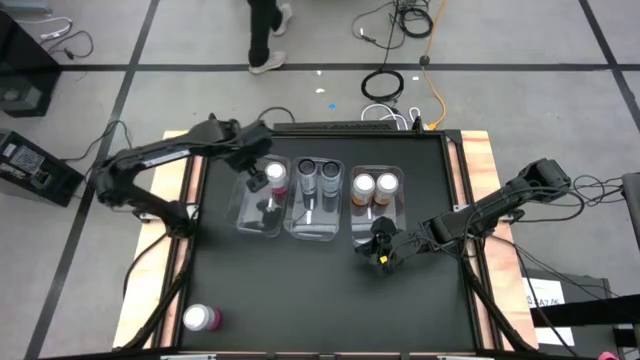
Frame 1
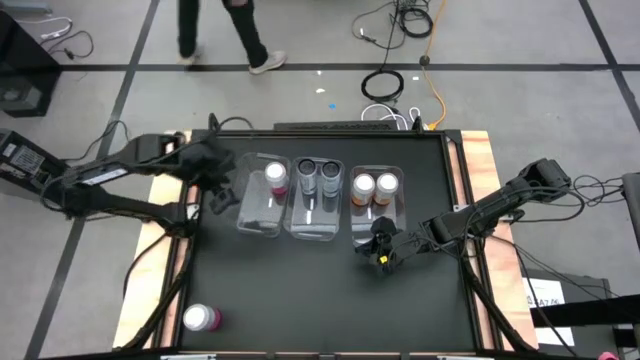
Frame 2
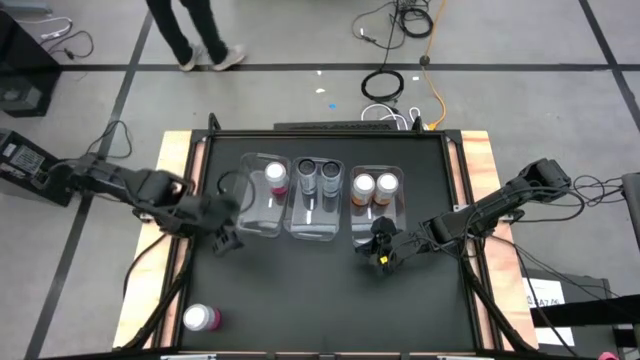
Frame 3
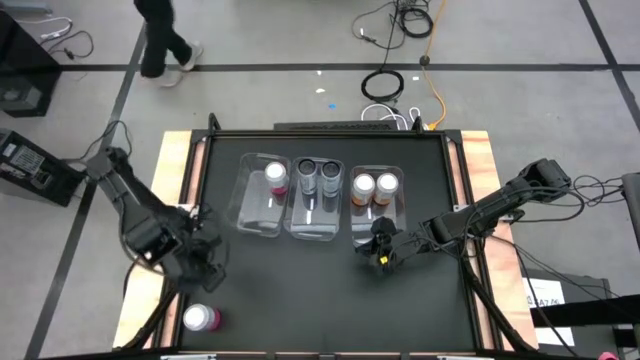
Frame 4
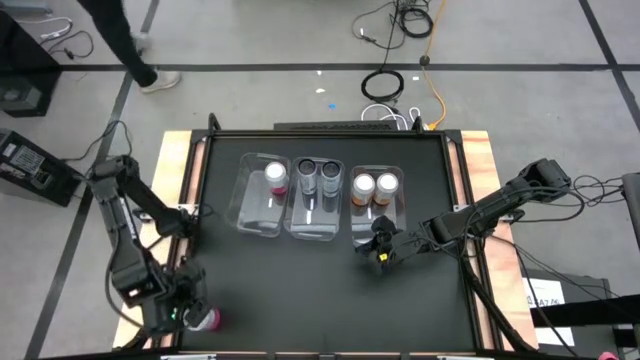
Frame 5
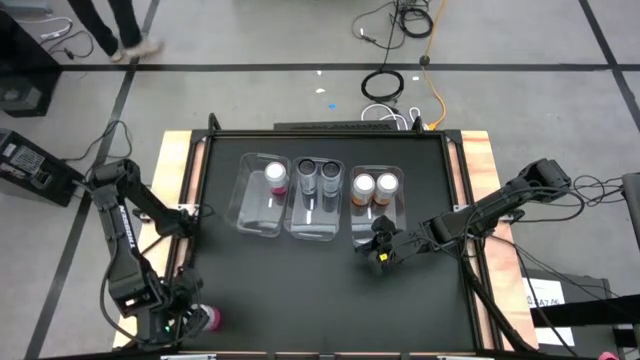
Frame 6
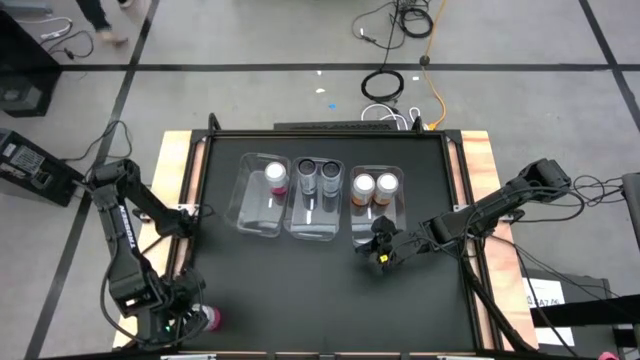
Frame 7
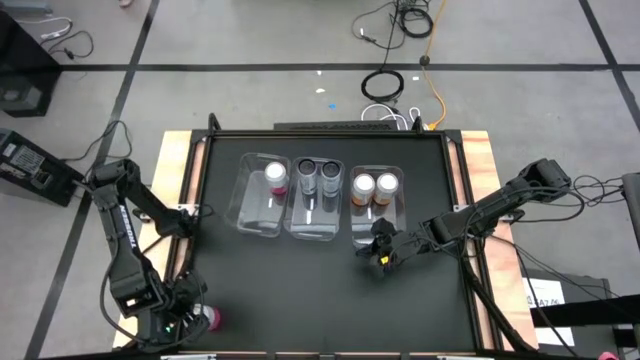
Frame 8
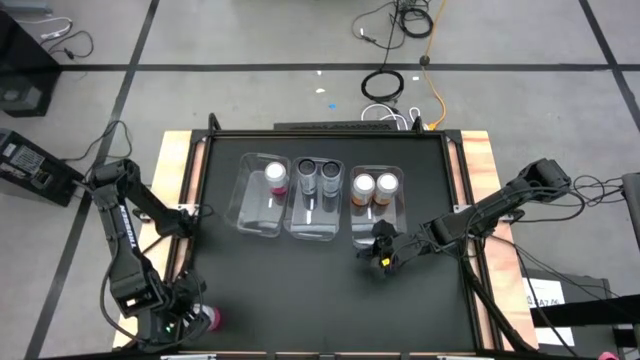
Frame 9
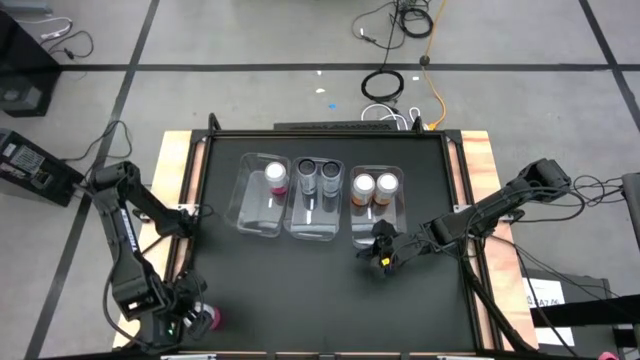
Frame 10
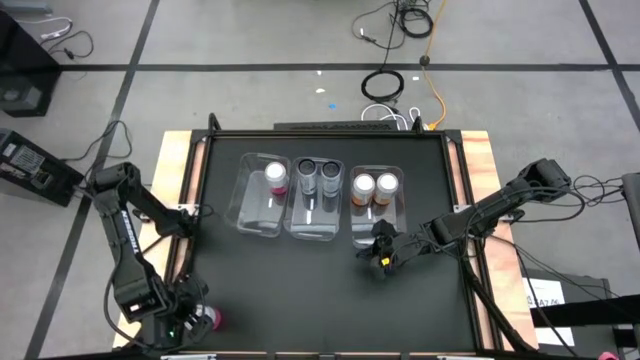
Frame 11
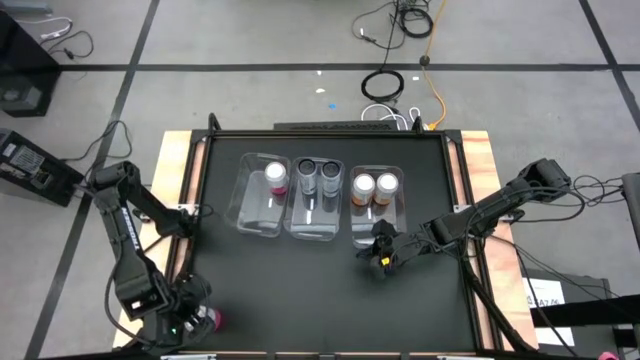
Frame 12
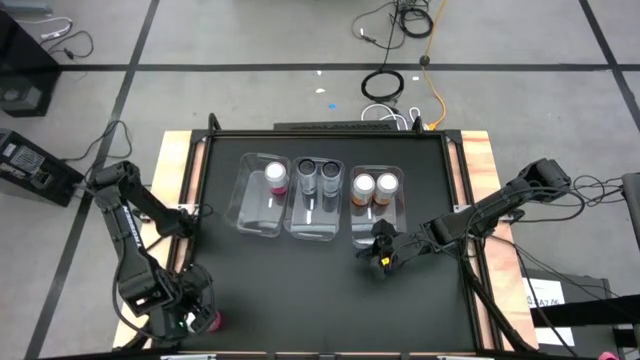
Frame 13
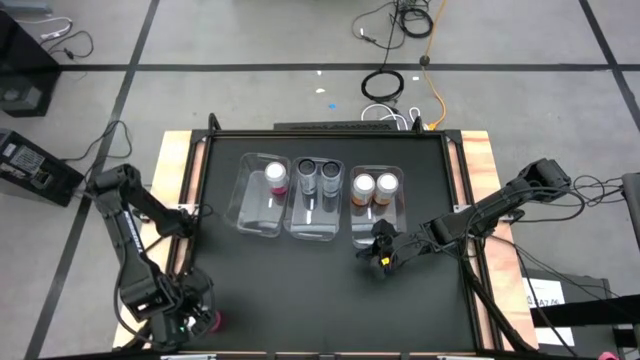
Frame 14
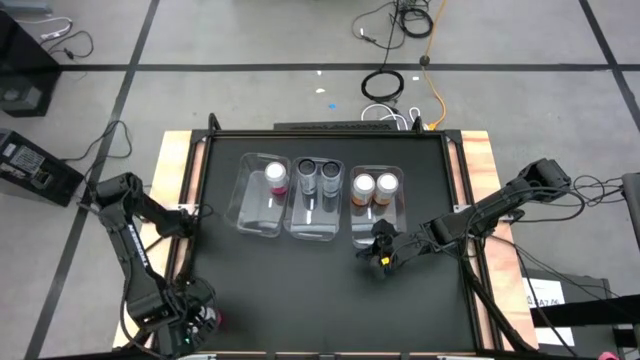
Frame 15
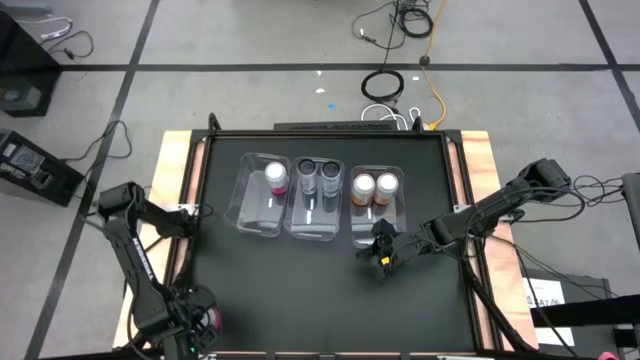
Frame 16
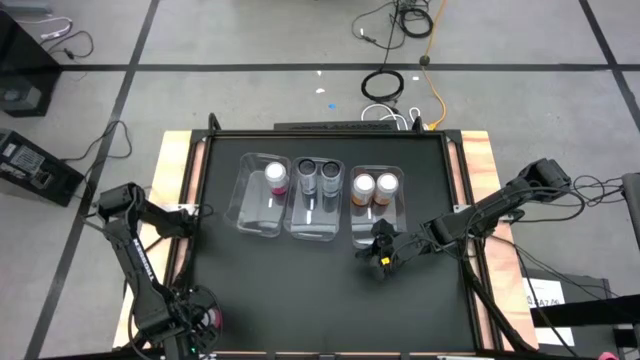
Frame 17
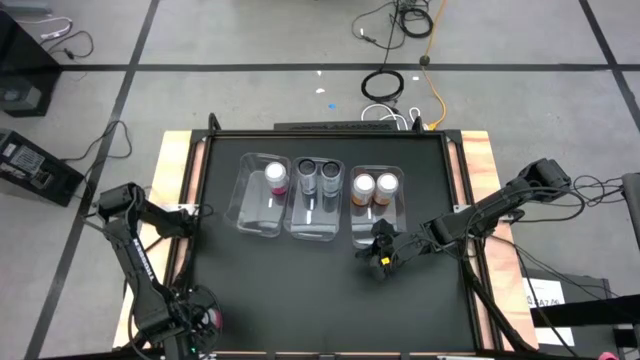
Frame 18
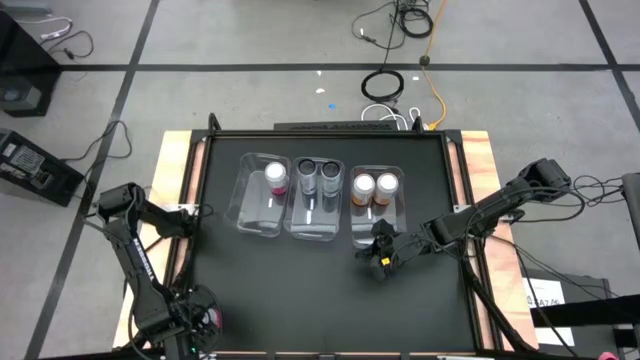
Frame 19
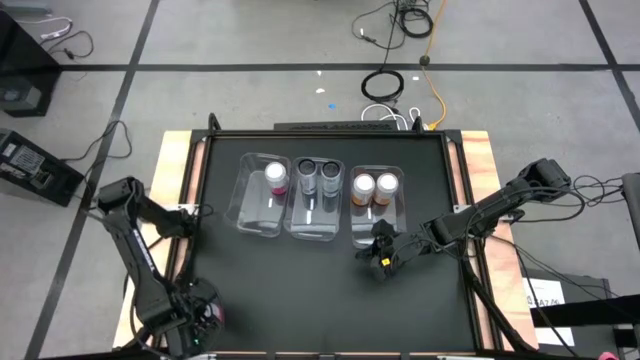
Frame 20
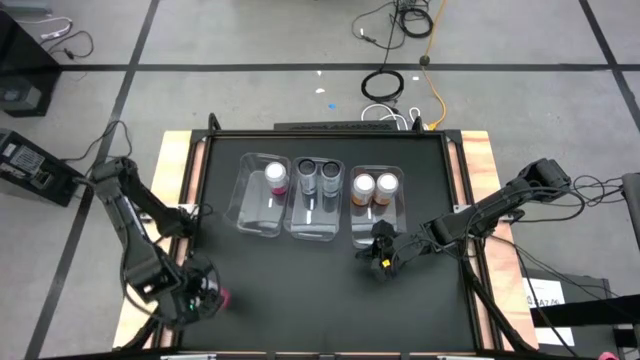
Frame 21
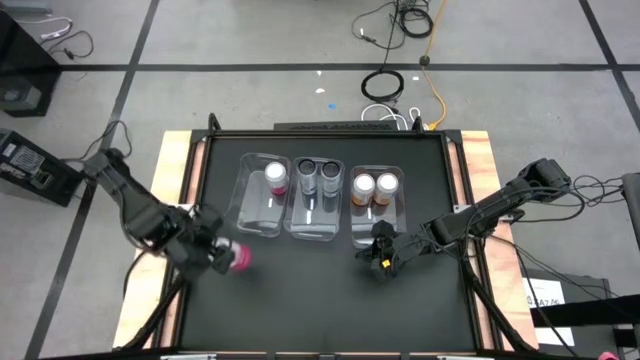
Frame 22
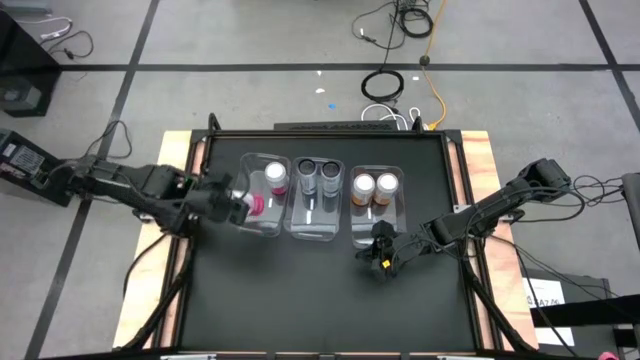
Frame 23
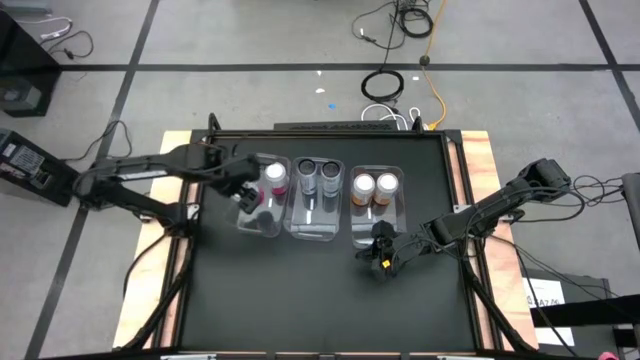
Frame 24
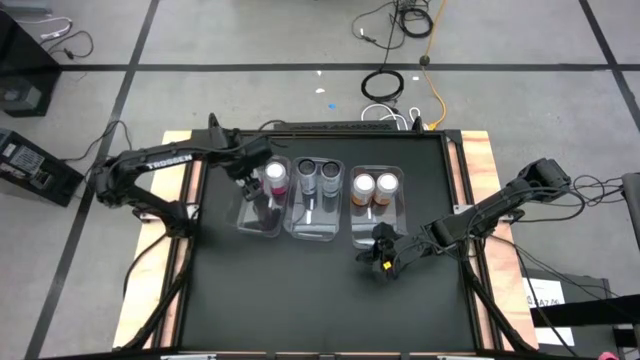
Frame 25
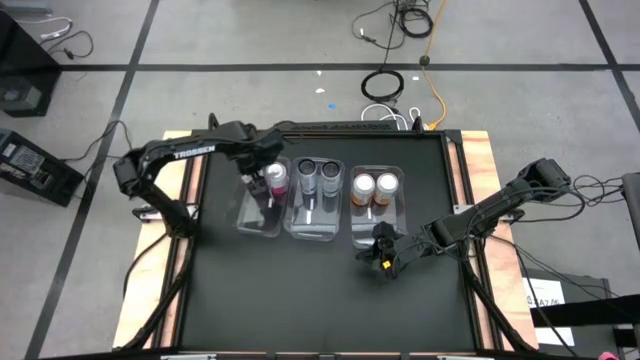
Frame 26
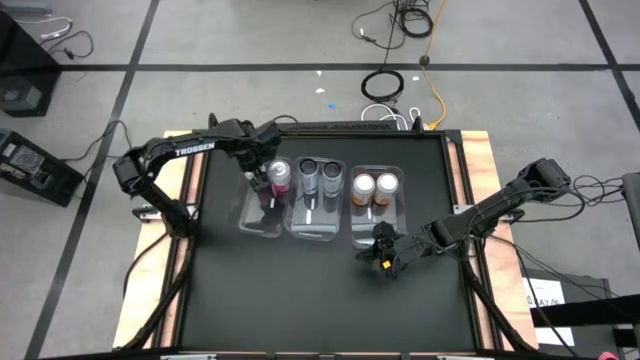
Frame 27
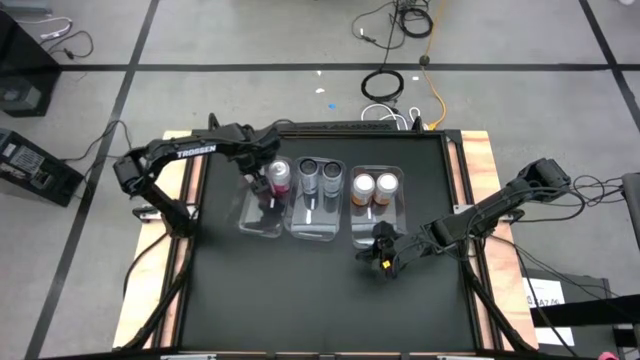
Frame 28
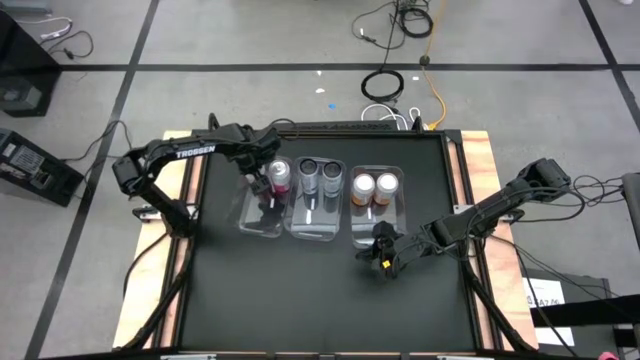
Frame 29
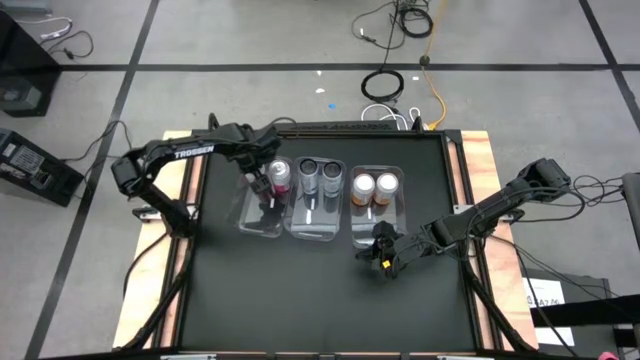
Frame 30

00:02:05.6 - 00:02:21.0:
Task: Sort soda cans
Put the pink-white soda can into the left transparent bin

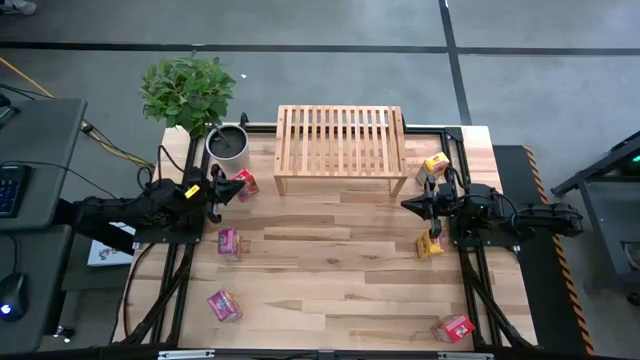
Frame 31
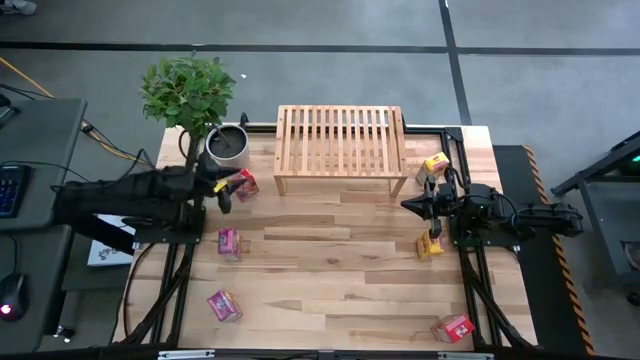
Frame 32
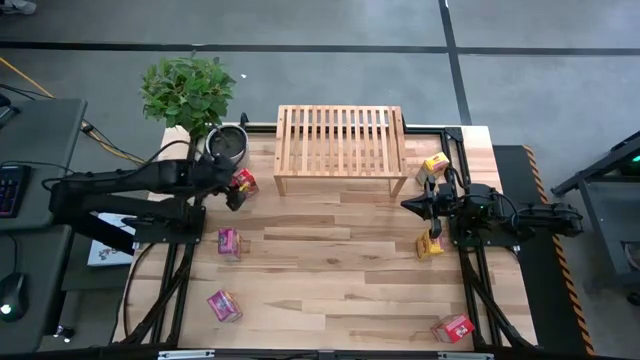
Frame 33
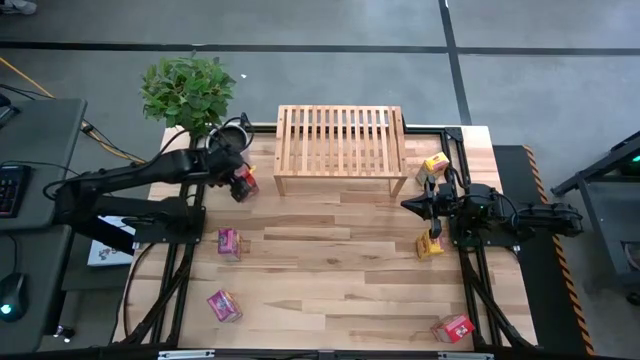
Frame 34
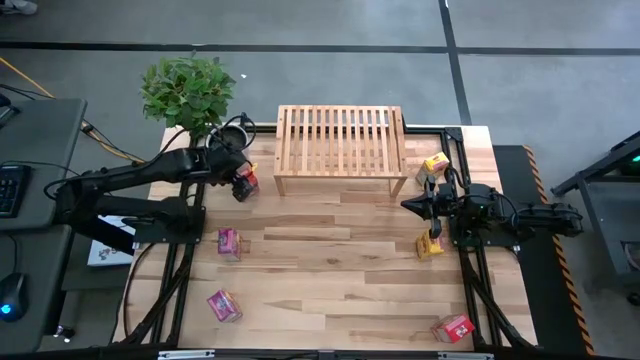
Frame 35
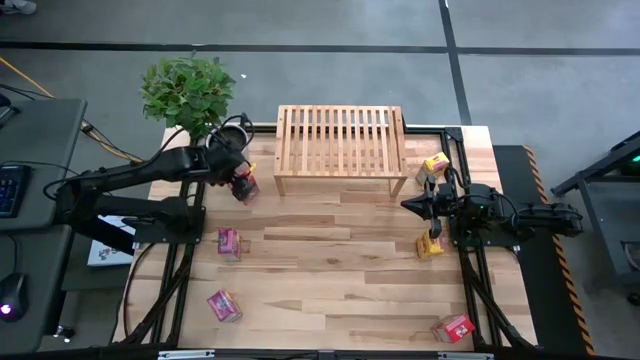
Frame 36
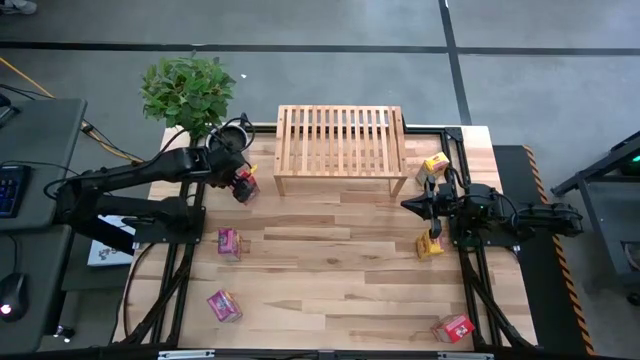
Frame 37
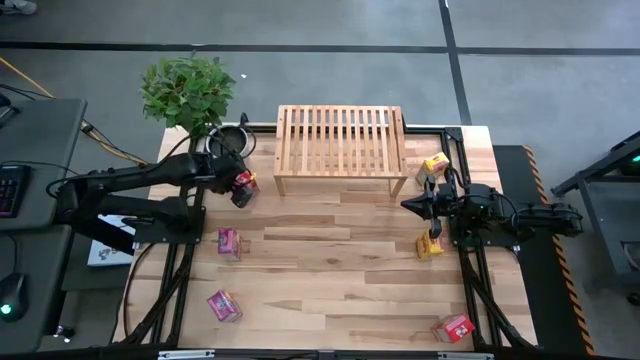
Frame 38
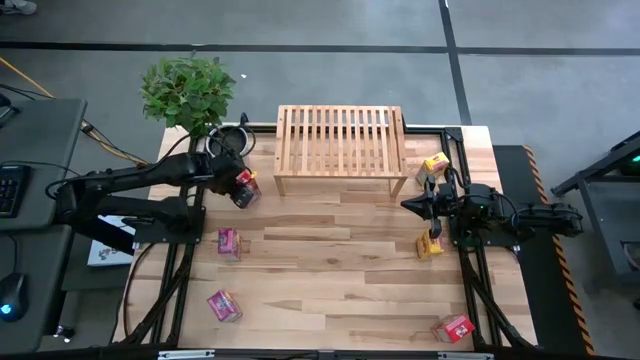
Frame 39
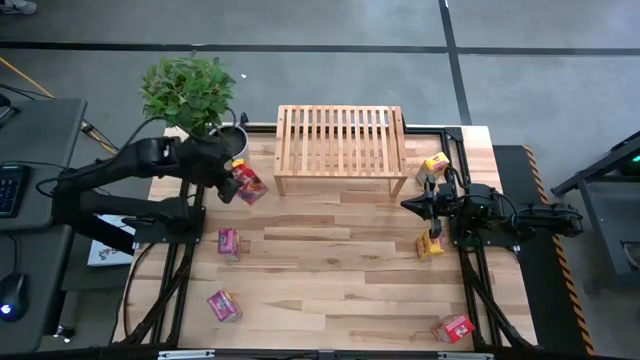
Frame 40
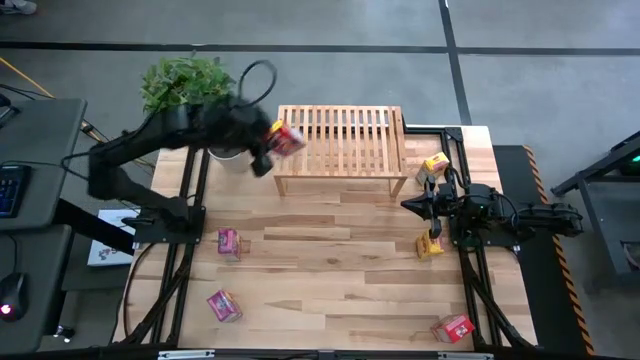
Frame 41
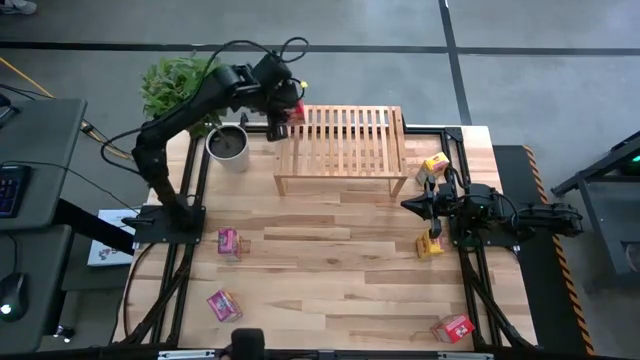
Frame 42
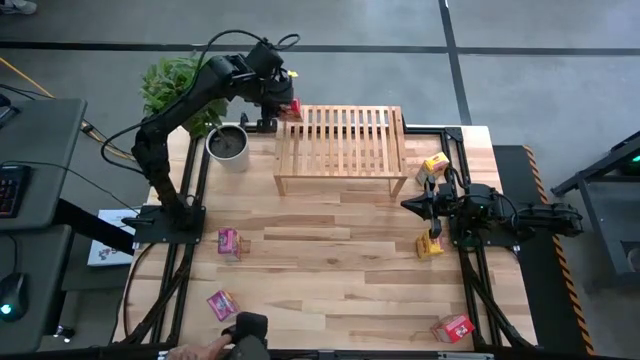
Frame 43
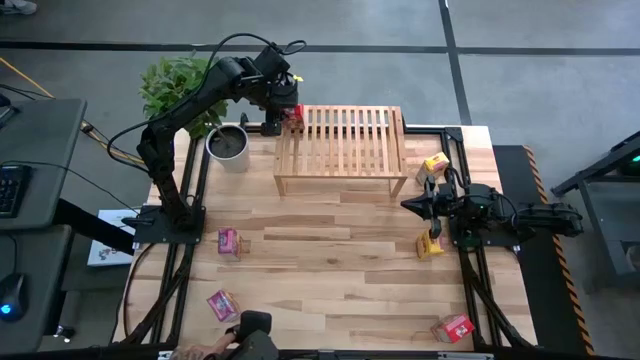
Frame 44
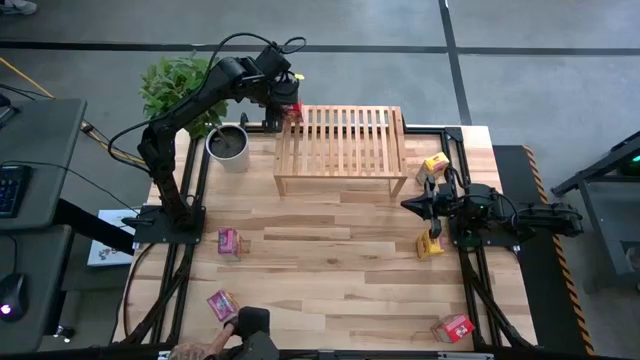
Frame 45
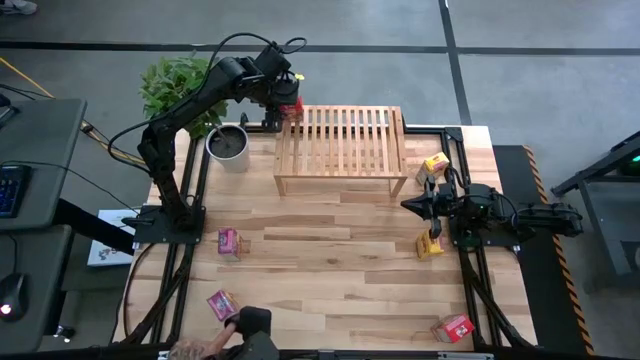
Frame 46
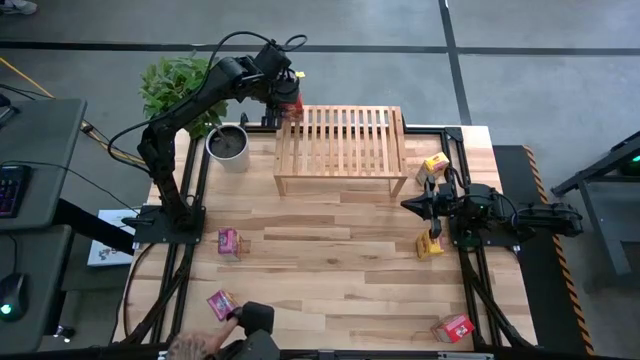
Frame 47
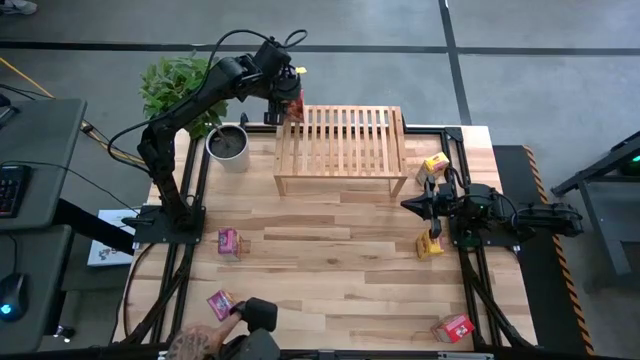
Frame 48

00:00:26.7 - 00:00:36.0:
Task: Stack cereal on shelf
Put the top red cereal box on the shelf
